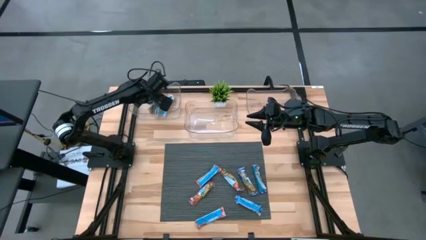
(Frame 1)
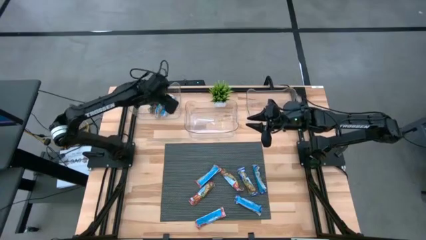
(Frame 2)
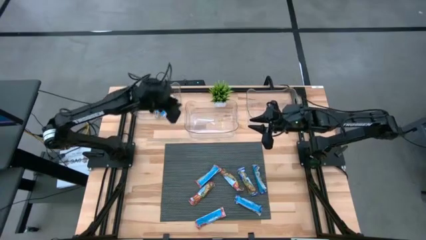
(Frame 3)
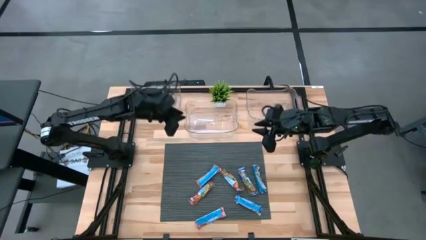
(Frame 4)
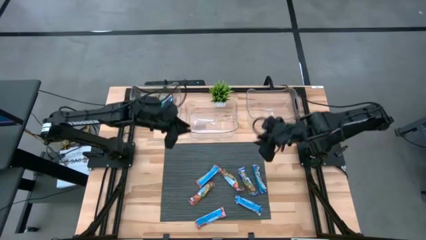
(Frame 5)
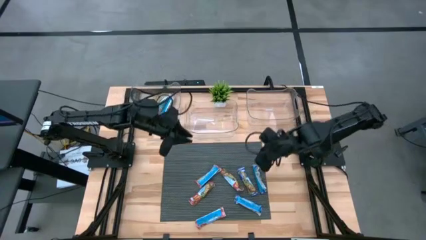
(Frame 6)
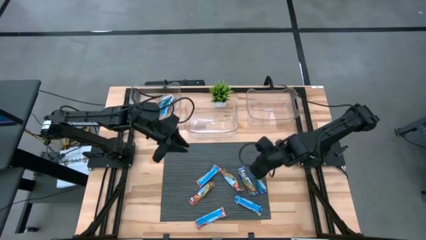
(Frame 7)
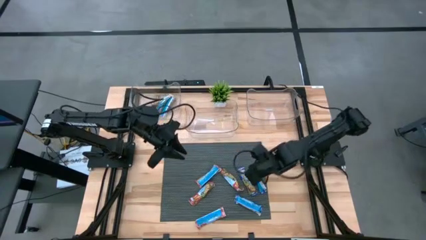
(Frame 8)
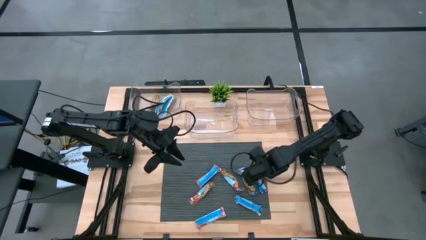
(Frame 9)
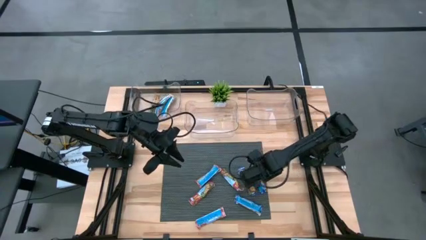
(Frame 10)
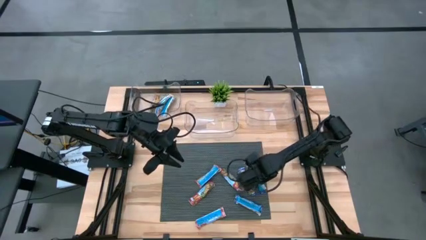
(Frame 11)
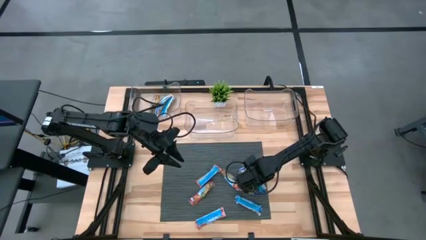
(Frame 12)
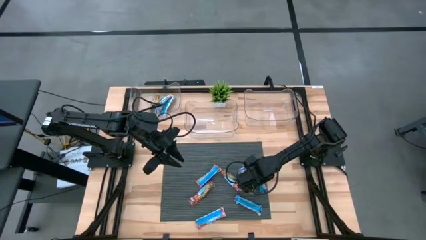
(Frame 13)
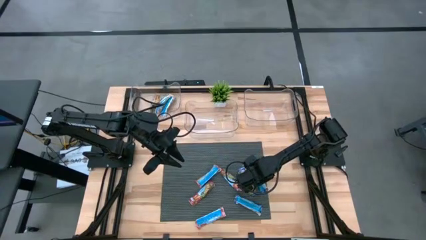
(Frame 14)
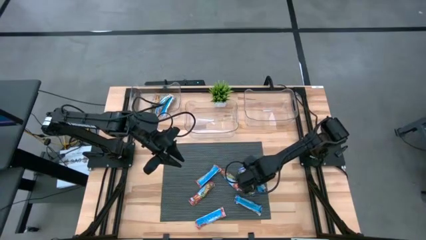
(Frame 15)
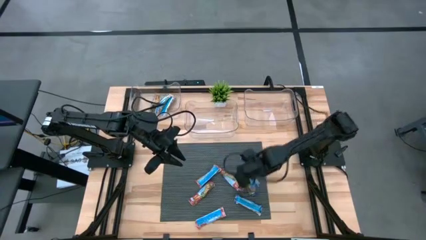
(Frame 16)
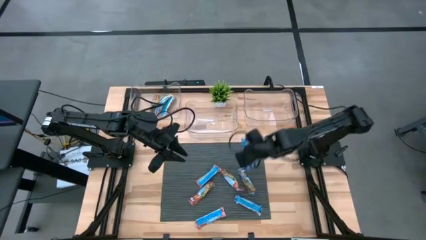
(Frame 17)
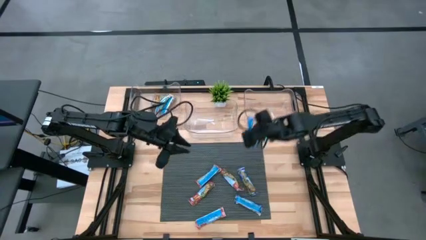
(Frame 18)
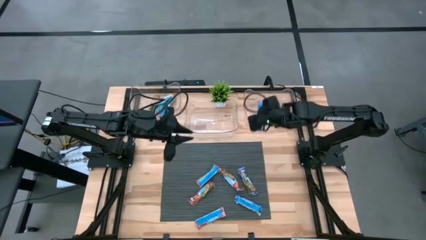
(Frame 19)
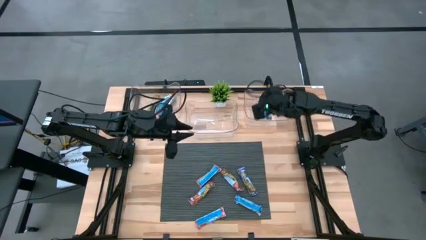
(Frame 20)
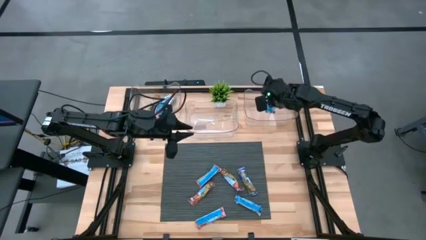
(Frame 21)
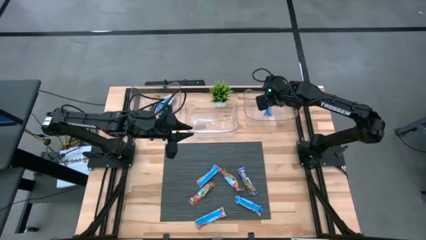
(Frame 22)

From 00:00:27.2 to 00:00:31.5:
Task: Pick and place Granola Bars by type
Put the blue granola bar into the right transparent bin

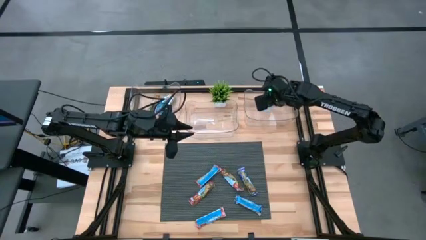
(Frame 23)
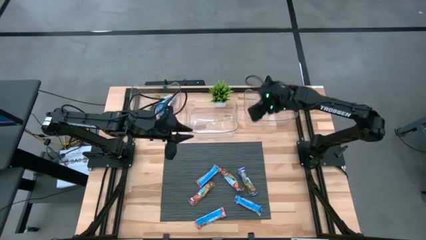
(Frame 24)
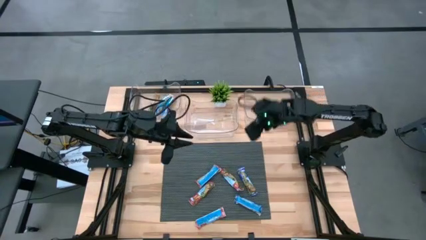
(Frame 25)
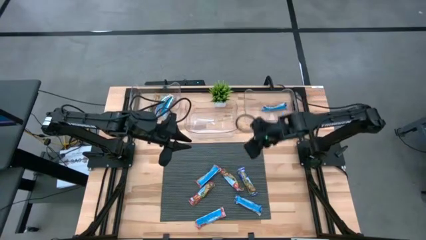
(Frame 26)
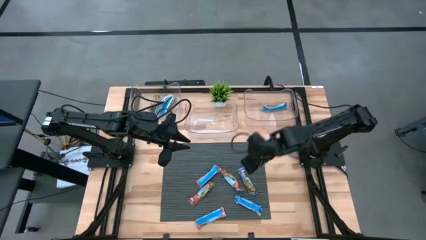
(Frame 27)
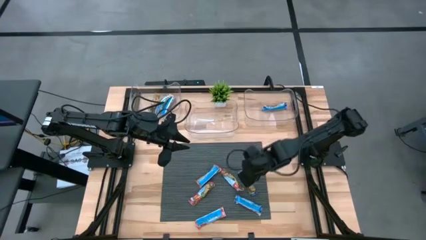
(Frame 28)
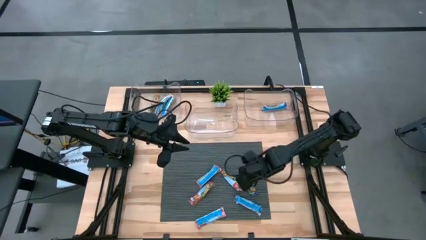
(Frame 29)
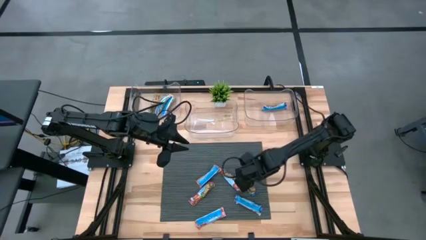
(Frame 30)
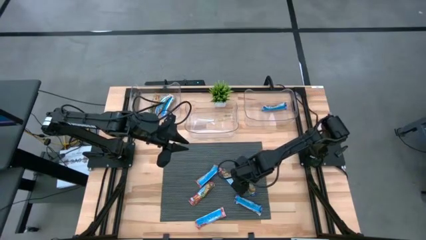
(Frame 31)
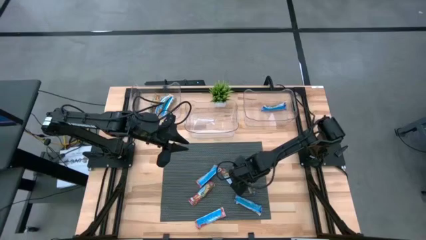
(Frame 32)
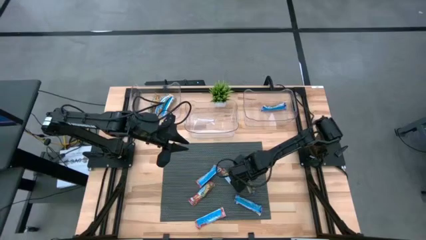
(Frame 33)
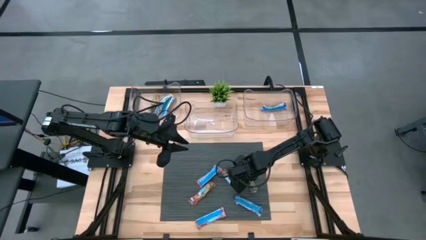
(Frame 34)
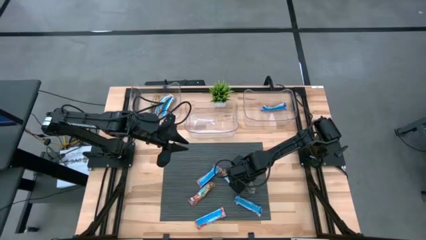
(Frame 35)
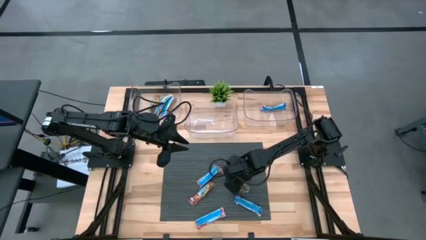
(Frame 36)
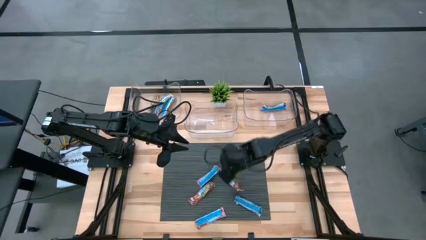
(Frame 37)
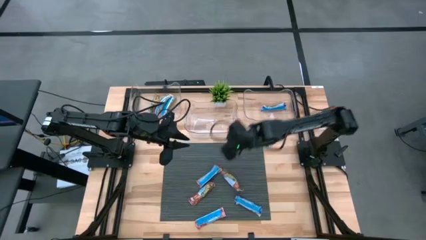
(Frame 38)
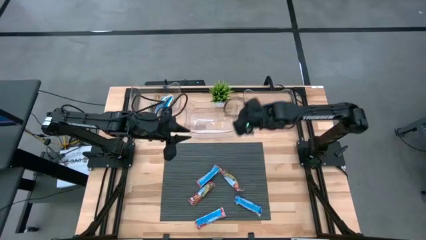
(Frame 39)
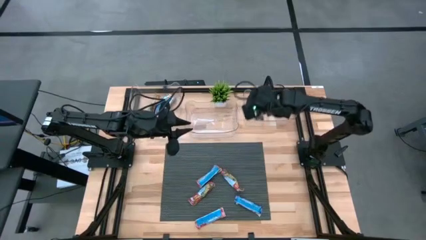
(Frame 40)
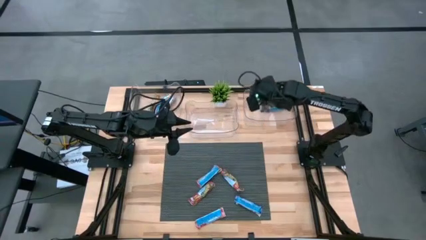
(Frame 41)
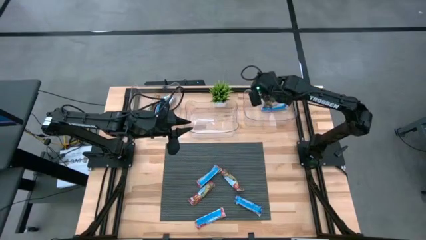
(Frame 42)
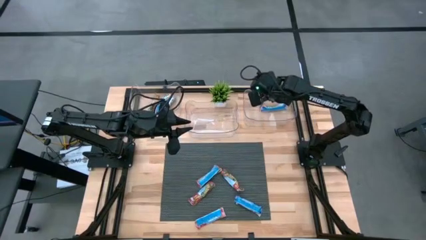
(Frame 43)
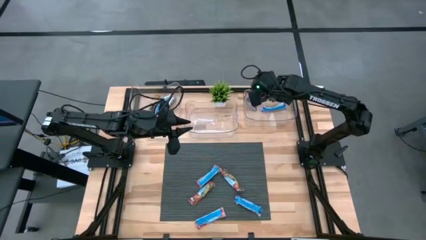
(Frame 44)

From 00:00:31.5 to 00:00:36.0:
Put the green granola bar into the right transparent bin

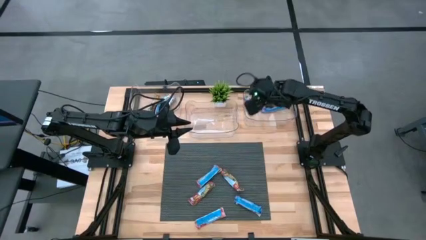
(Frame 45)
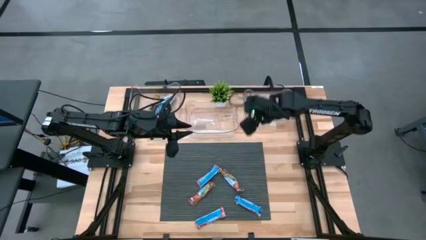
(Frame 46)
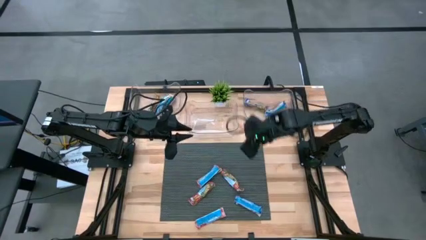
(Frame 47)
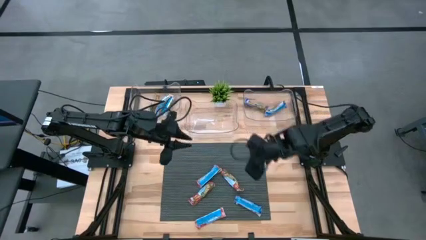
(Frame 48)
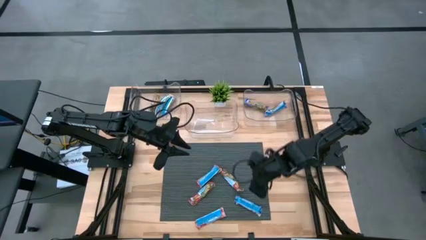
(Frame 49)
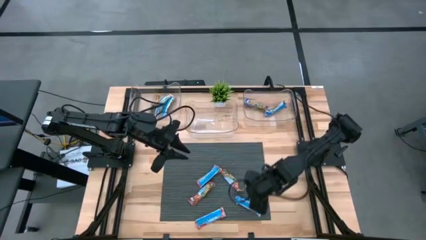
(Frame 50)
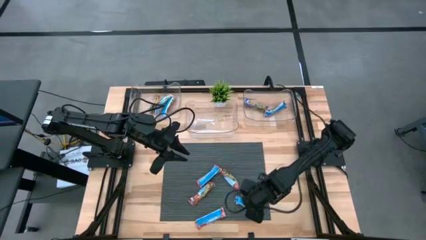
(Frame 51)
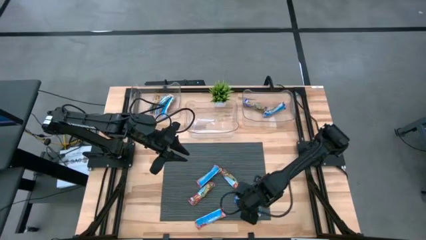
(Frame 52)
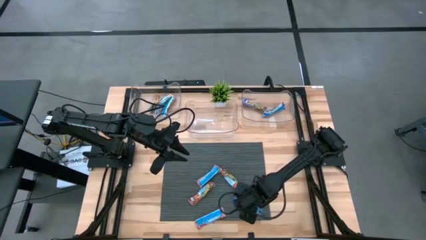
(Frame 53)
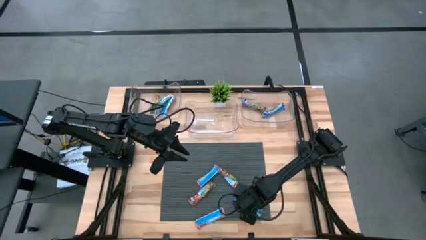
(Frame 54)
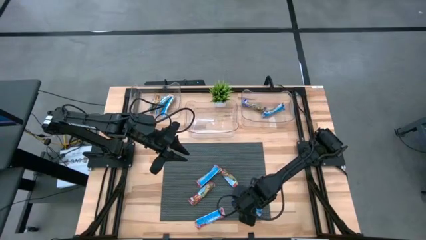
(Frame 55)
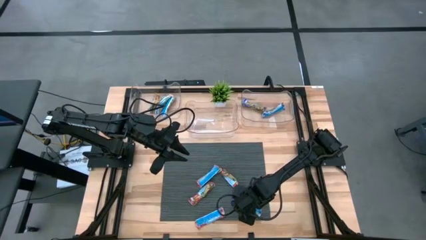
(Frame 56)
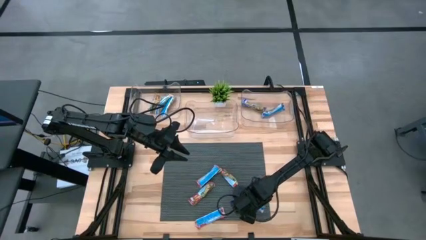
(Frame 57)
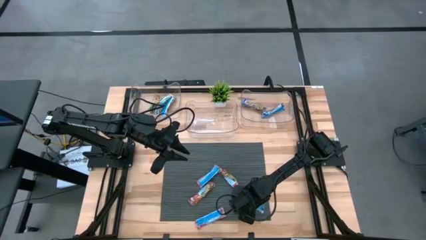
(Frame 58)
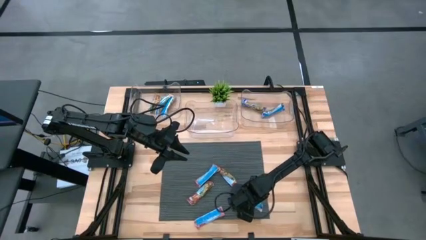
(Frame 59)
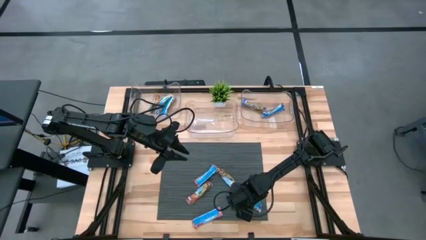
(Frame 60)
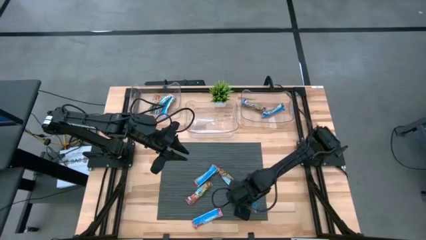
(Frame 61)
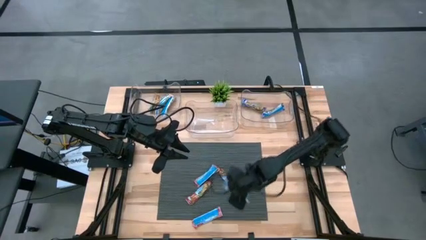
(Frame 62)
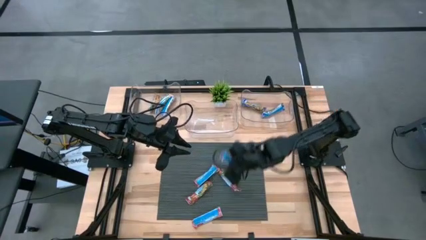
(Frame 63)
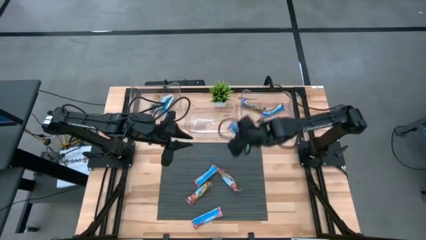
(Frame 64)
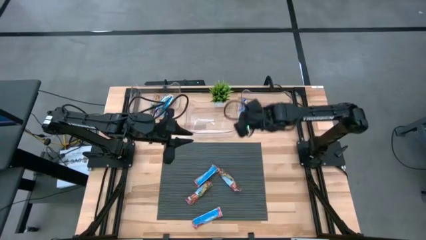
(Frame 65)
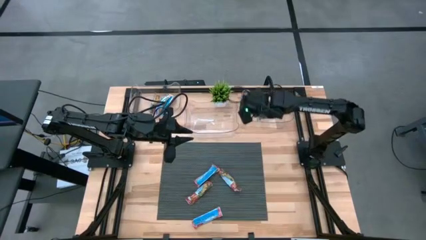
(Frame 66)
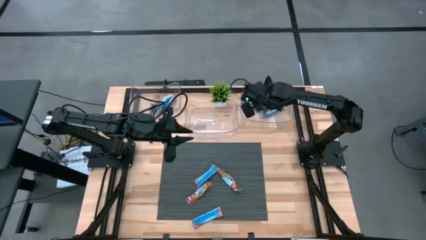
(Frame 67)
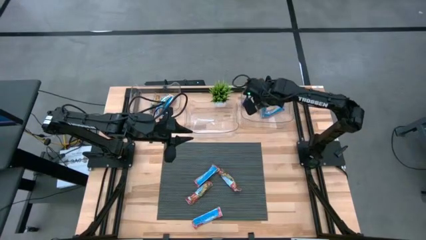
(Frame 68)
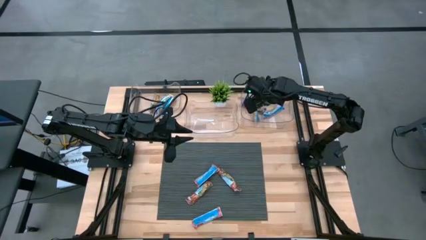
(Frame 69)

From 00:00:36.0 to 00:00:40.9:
Put the blue granola bar into the right transparent bin

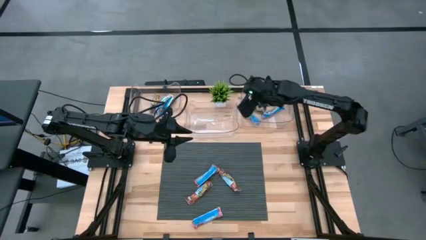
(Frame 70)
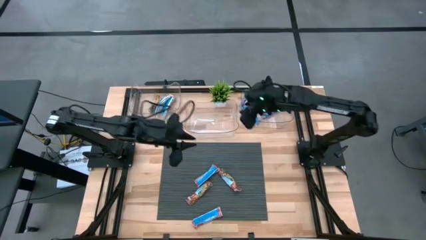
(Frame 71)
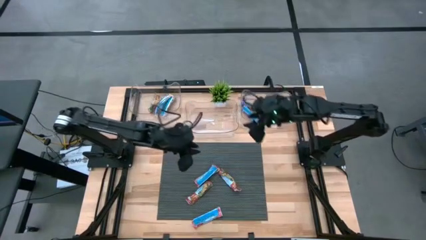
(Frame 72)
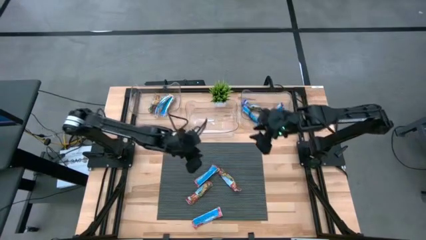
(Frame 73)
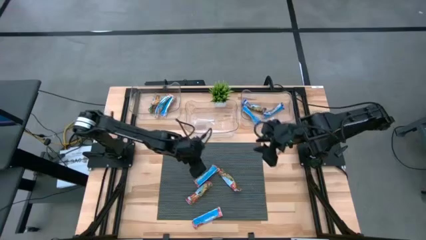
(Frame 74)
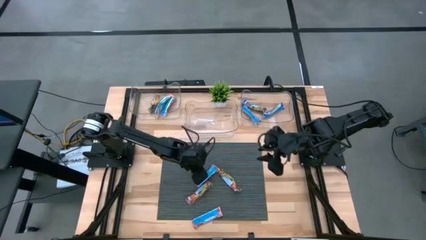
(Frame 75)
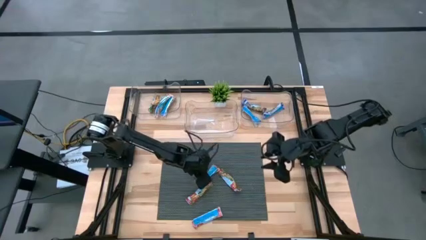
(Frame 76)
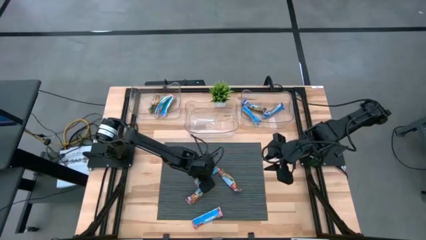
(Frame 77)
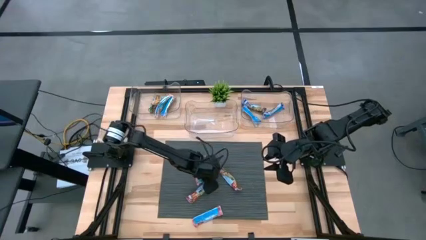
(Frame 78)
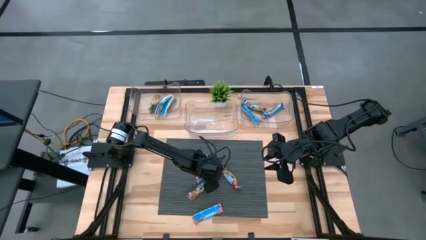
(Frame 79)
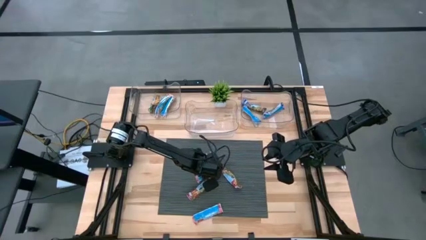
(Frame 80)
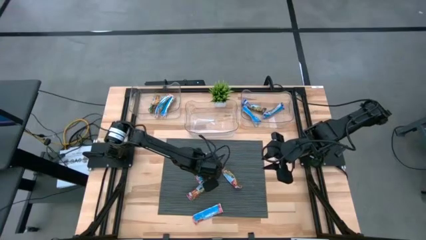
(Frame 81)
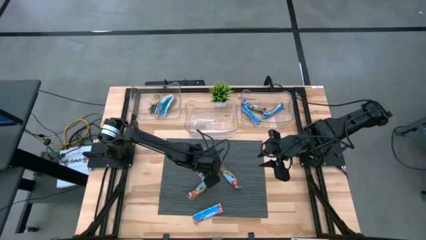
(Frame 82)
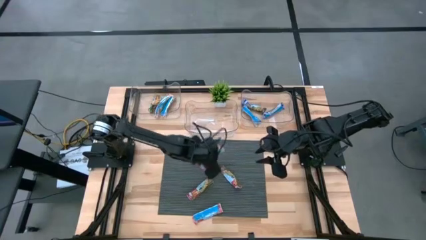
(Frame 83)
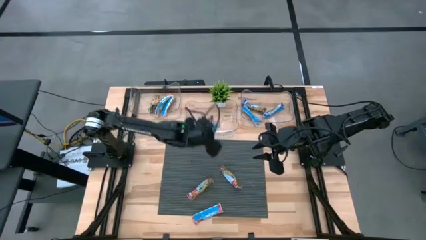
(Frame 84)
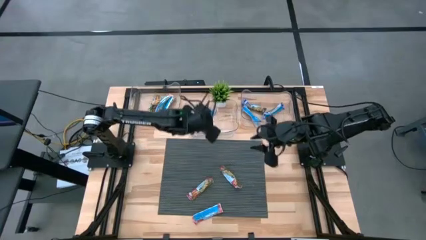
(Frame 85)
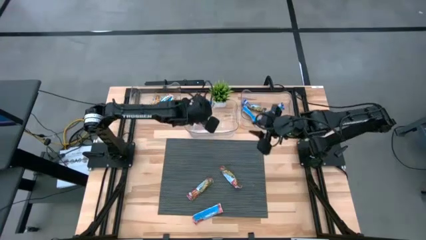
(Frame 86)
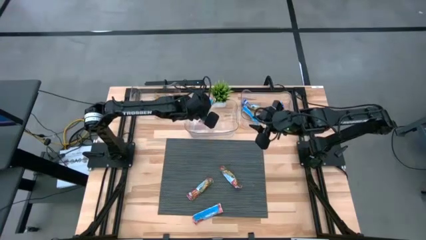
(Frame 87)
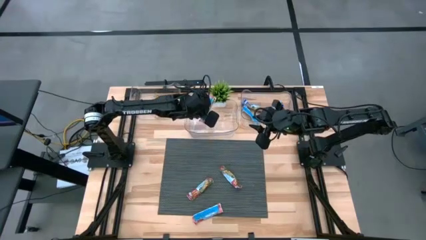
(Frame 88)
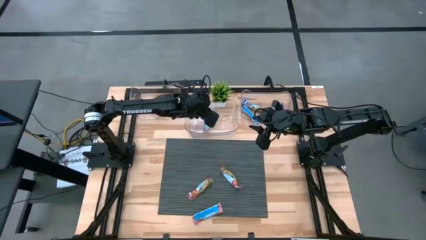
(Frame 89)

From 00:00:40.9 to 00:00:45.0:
Put the red granola bar into the center transparent bin
